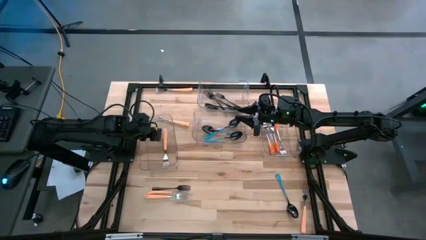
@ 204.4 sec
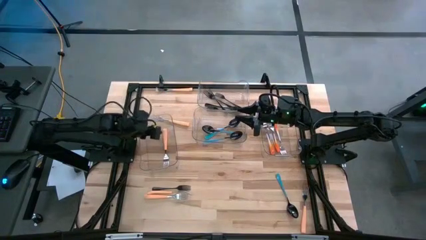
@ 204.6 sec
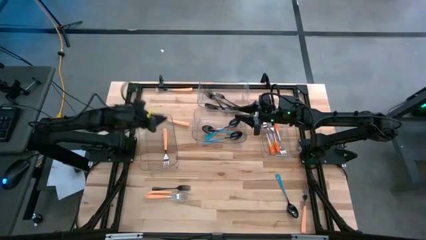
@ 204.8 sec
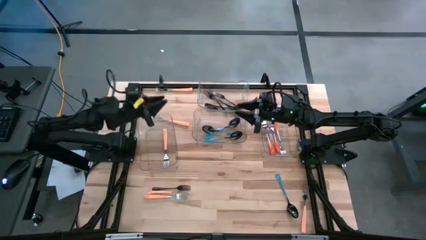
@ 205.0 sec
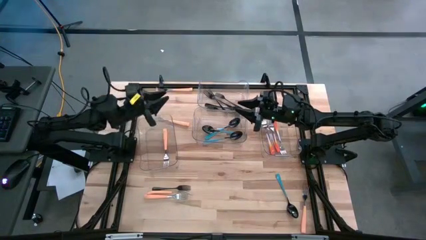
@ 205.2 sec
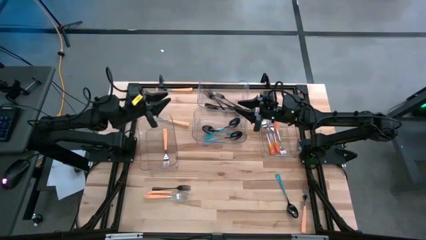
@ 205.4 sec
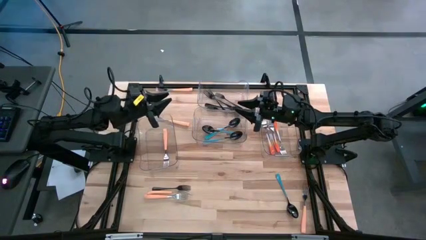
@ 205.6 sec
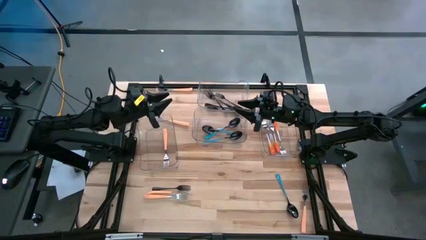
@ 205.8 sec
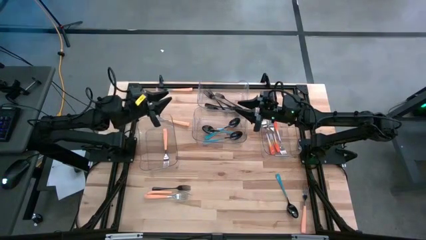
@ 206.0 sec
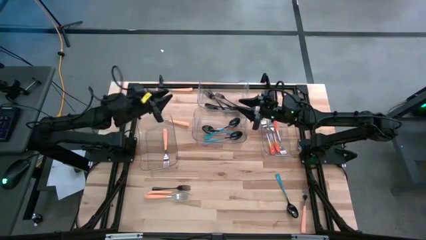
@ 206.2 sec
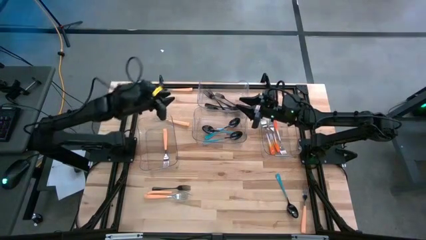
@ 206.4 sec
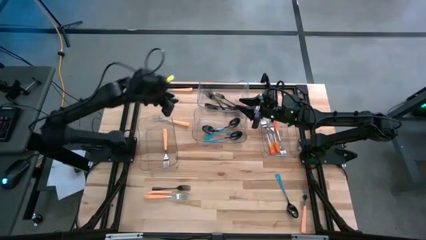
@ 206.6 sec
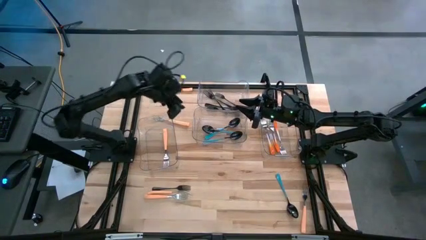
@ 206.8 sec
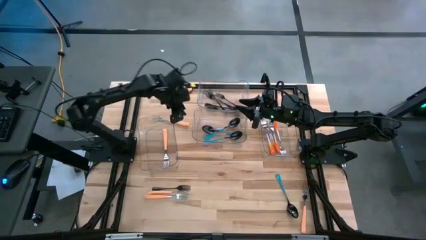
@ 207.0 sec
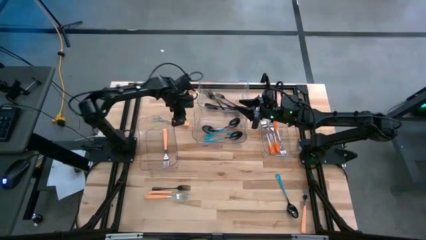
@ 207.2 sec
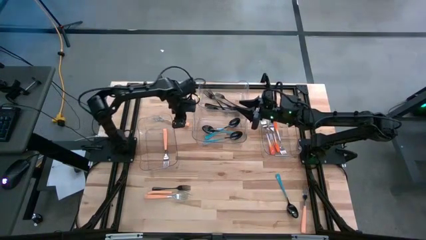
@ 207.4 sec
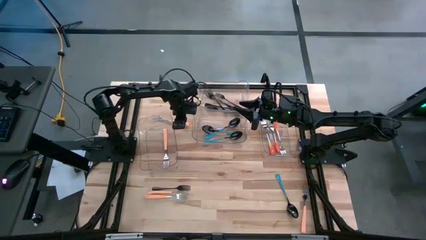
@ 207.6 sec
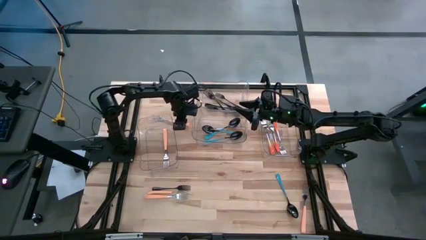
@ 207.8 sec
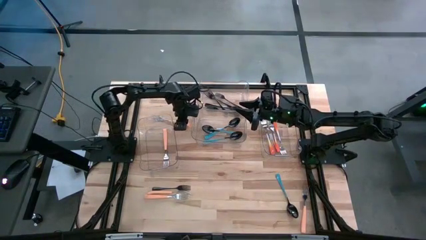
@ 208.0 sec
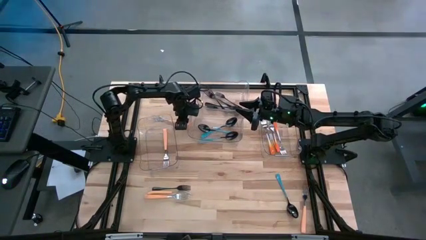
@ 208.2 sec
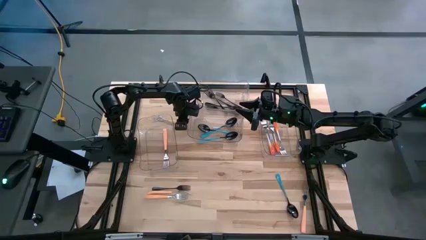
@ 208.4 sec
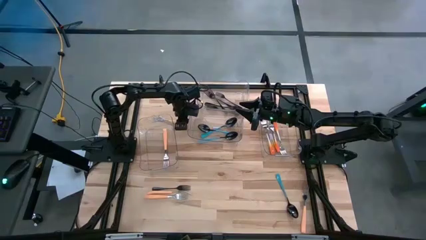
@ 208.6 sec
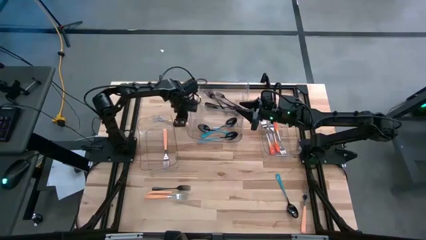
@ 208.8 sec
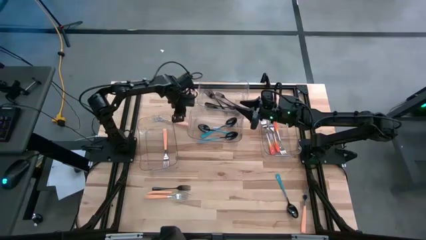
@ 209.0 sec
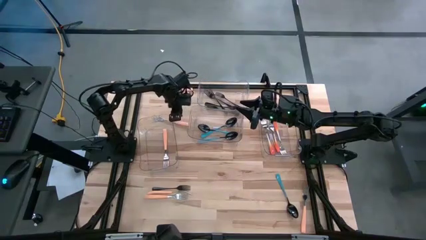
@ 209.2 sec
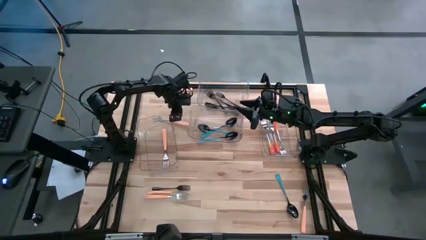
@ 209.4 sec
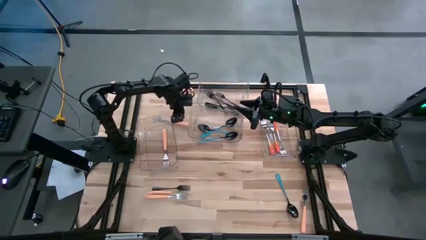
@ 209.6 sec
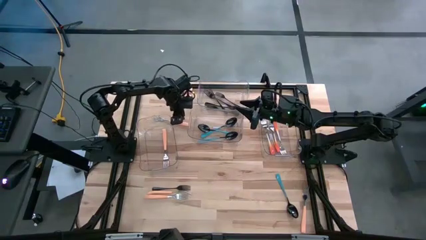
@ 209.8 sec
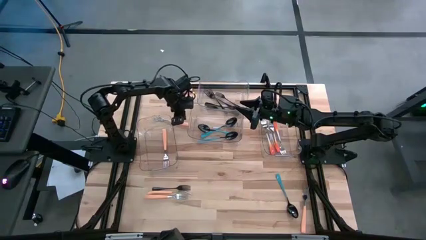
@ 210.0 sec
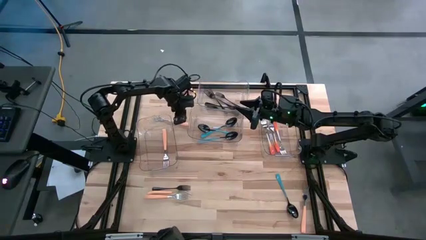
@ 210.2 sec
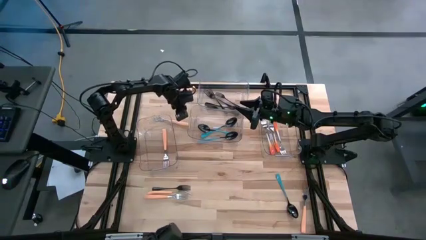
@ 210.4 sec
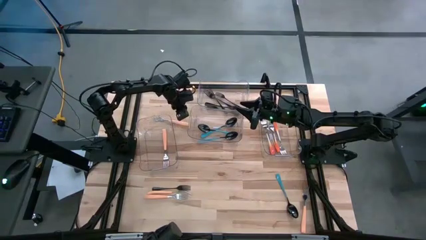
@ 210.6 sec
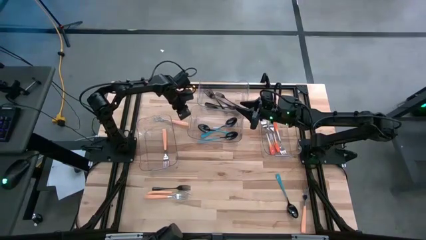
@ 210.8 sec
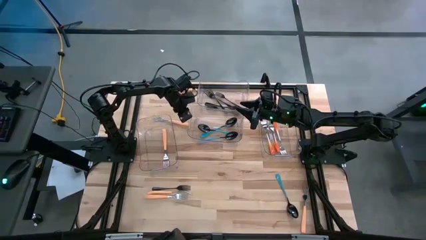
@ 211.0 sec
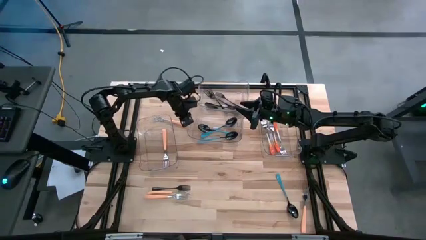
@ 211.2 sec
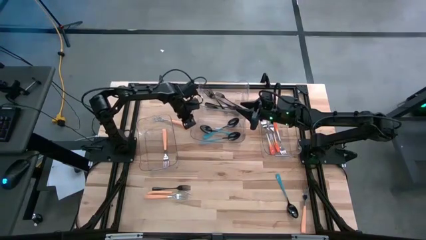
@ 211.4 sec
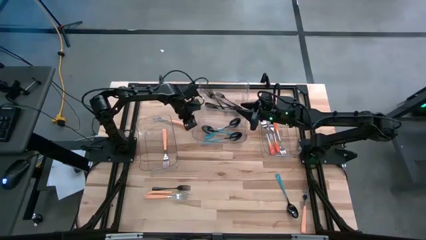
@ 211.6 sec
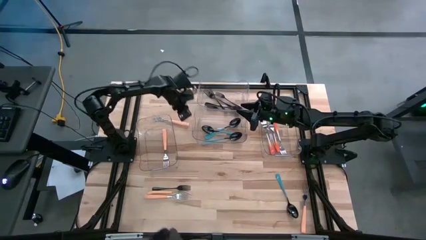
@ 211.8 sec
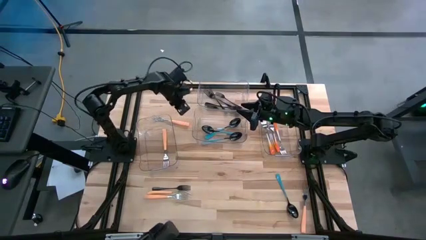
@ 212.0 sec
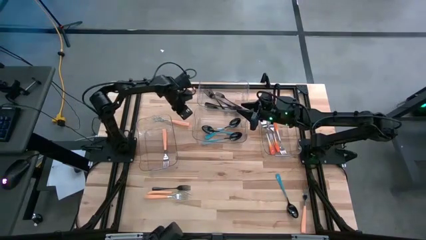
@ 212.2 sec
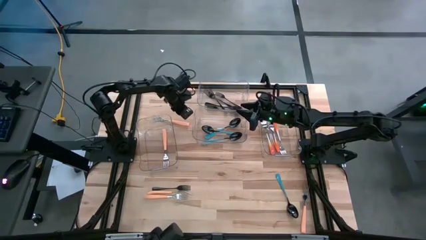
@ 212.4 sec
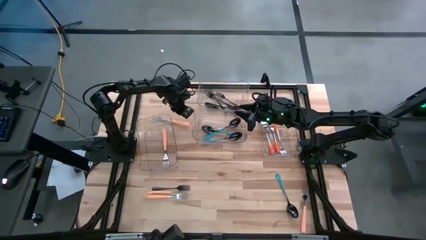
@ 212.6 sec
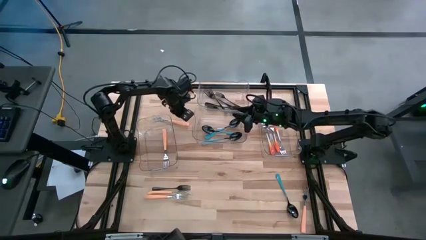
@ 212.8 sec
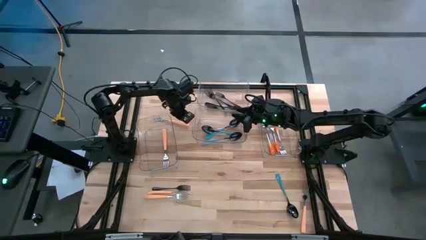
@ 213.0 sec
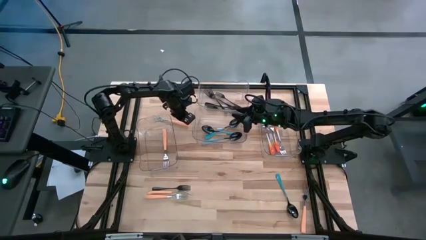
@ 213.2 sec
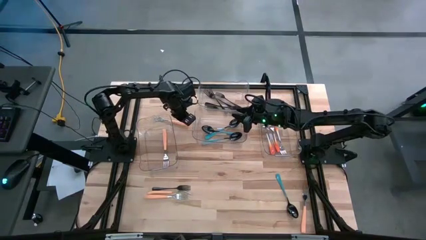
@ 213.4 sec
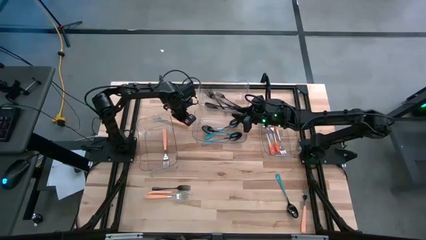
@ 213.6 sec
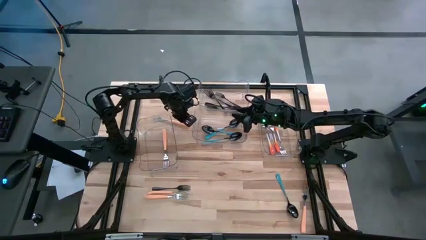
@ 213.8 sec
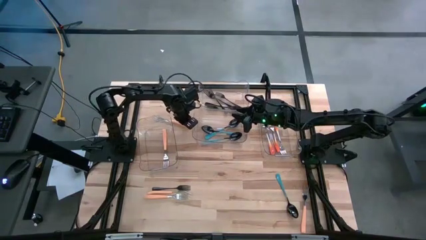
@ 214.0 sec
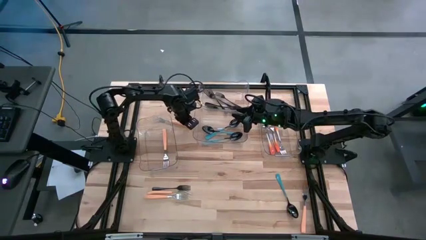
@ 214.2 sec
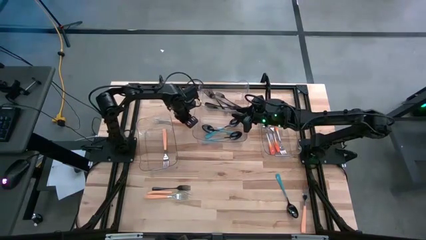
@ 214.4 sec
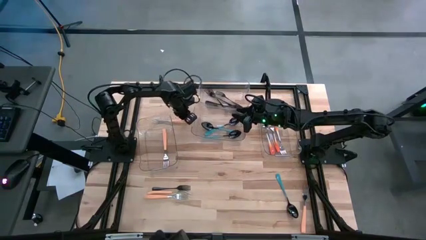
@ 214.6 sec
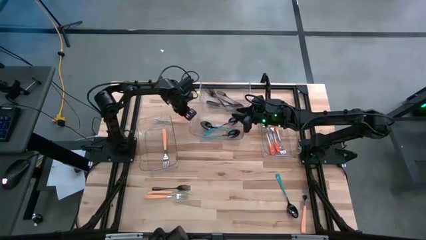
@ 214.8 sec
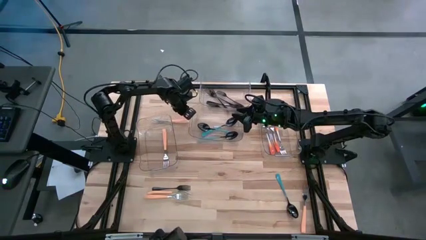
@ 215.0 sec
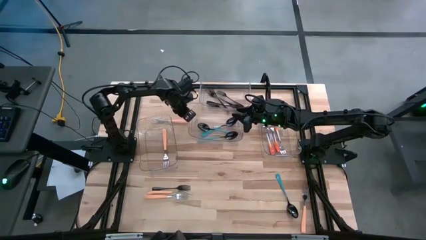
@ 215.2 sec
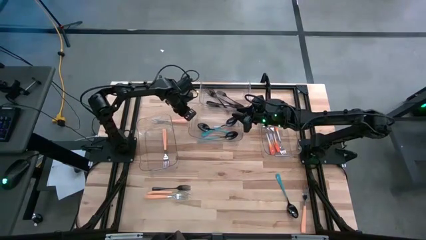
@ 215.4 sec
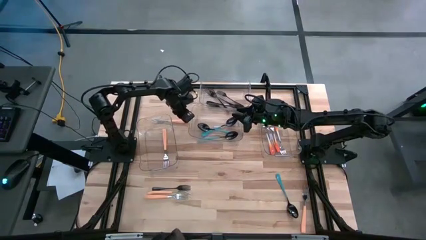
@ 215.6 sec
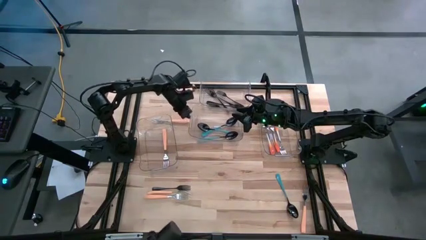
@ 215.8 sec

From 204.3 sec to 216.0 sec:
Task: Sort silverware by color (type)
Put the light orange fork into the bottom left transparent bin
